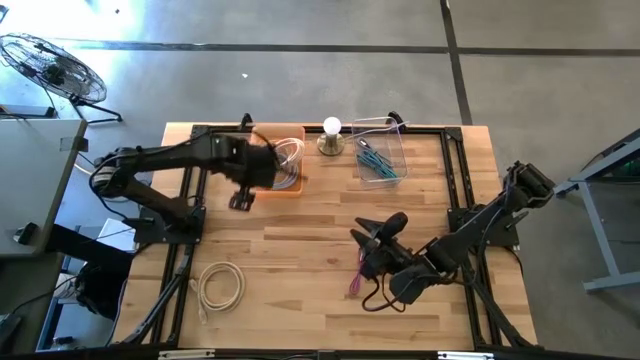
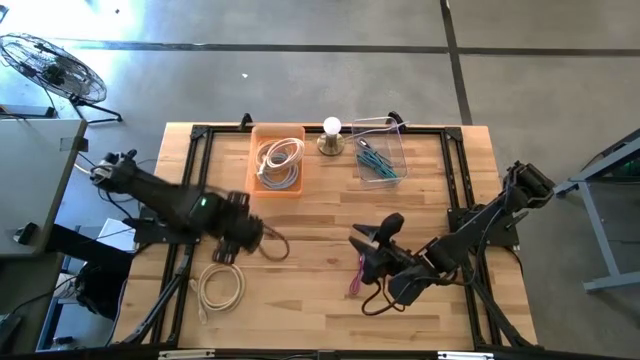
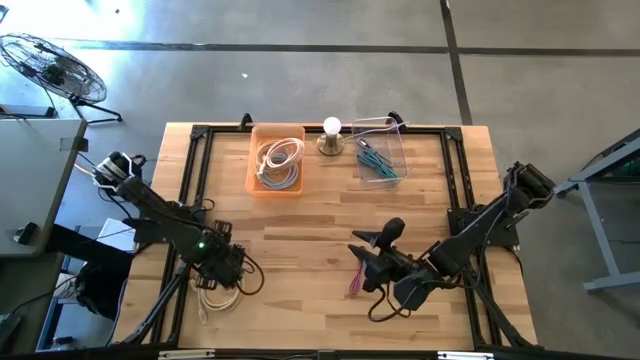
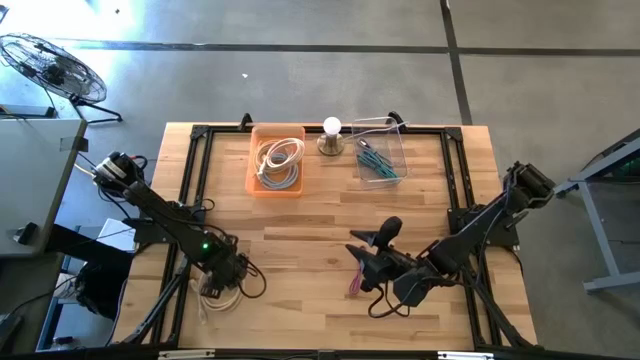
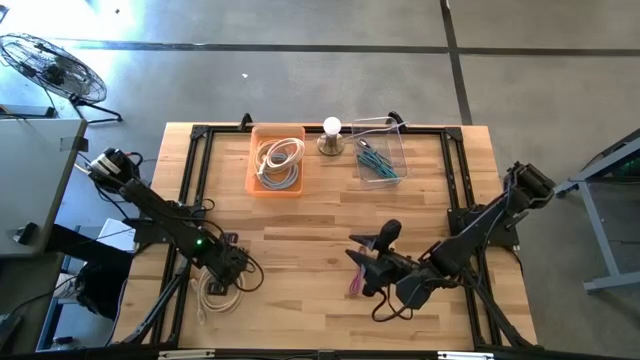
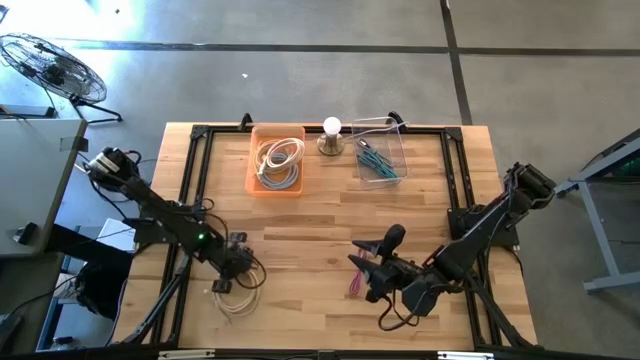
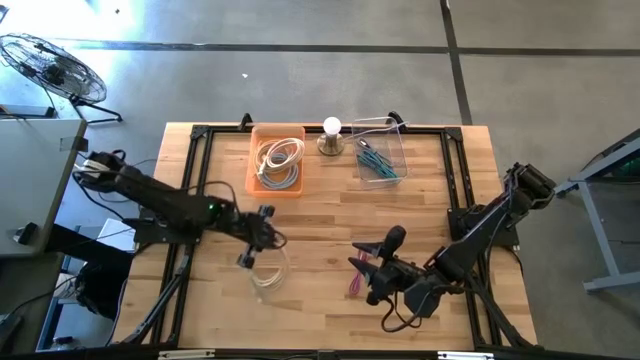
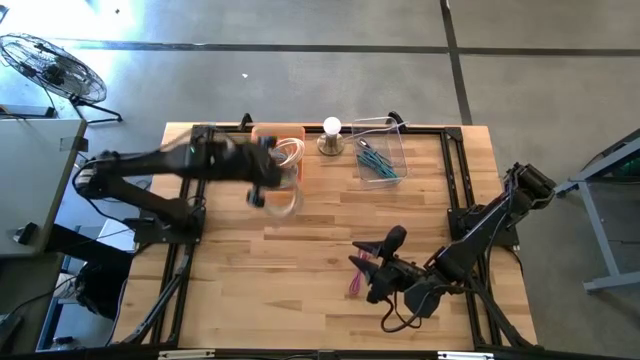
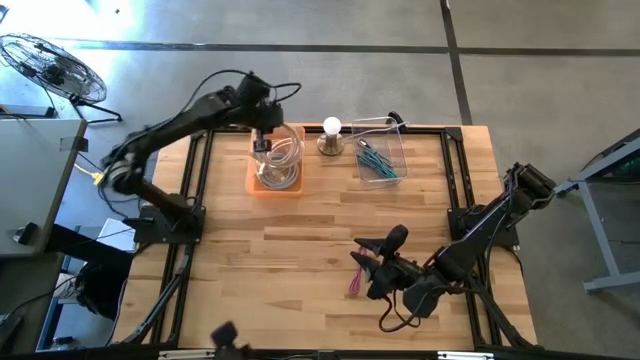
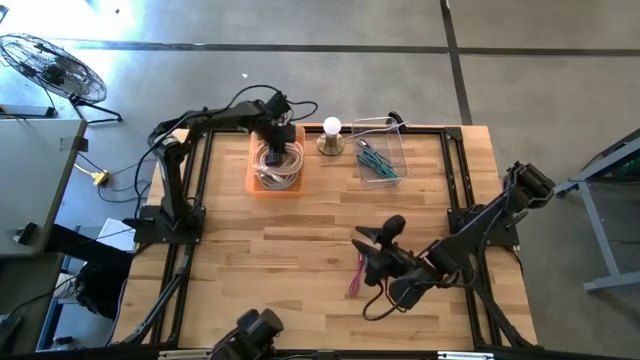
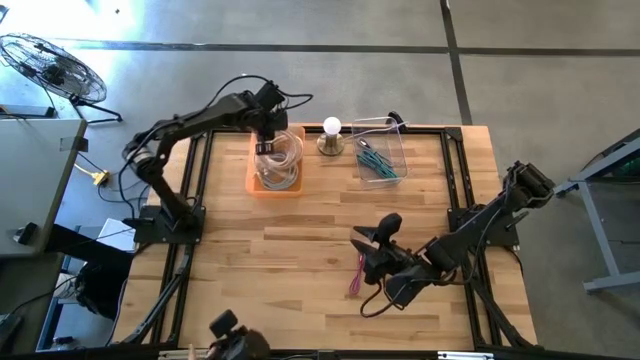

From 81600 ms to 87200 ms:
Task: Pick & Place USB Port
Put the light brown HDMI cable into the orange bin

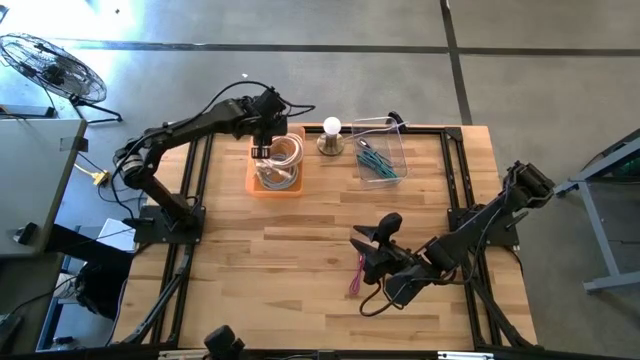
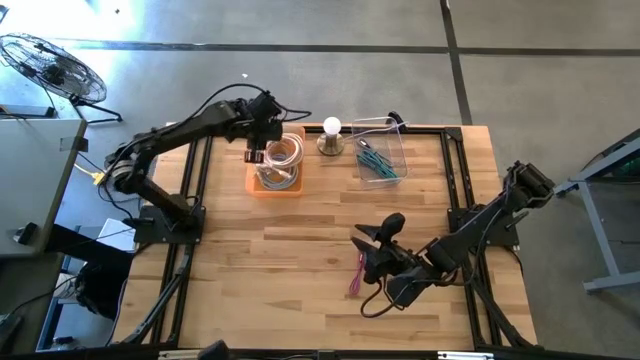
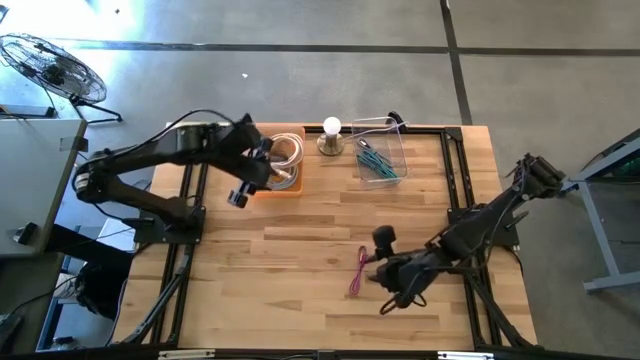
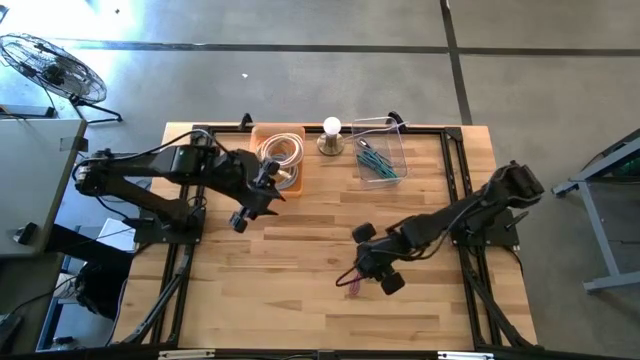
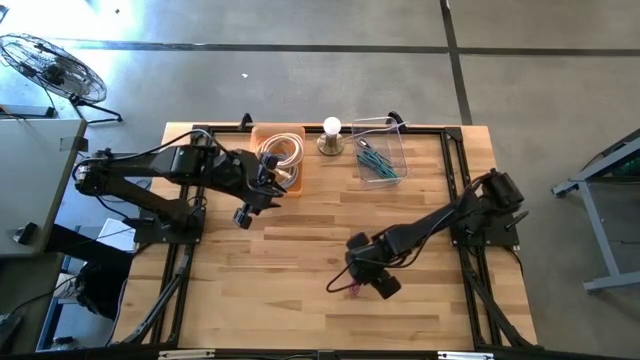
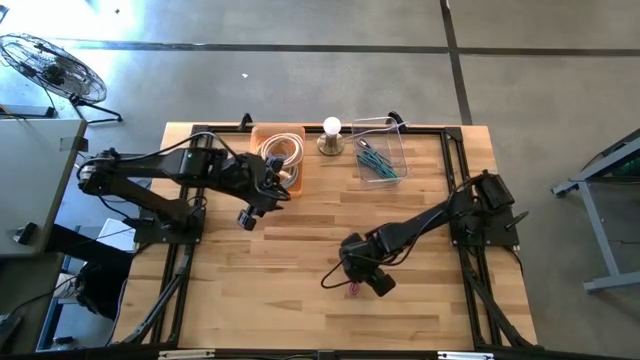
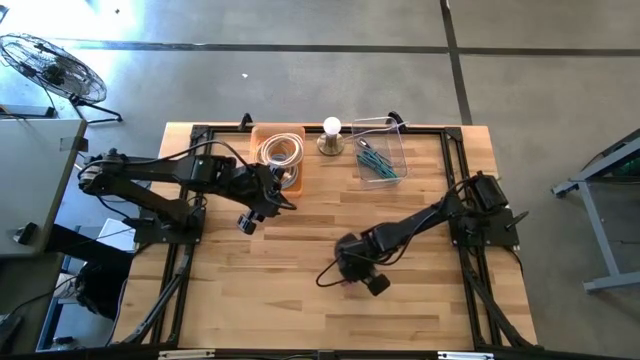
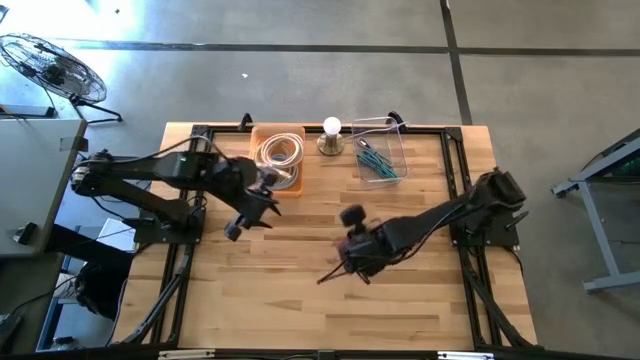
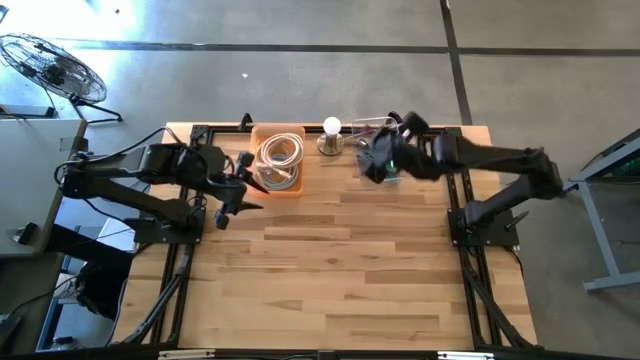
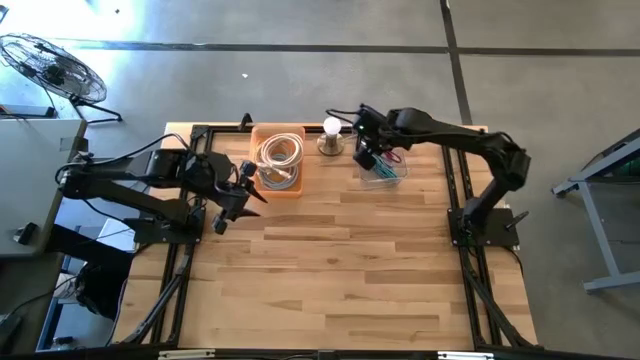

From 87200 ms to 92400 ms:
Put the pink charger cable into the transparent bin

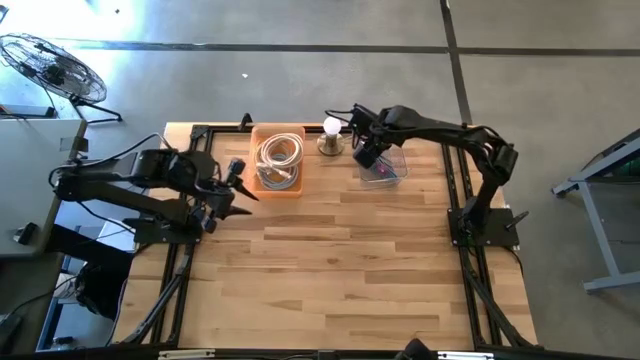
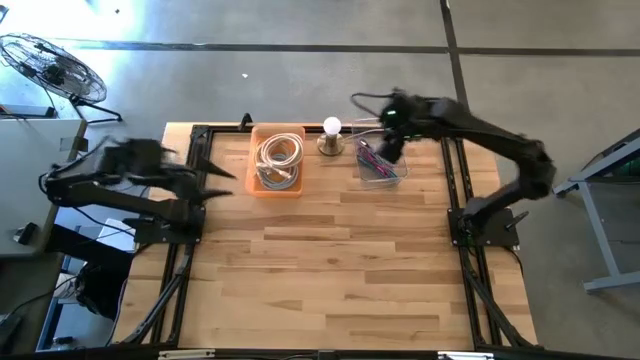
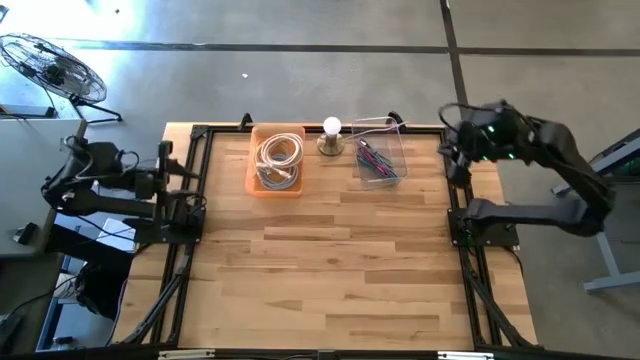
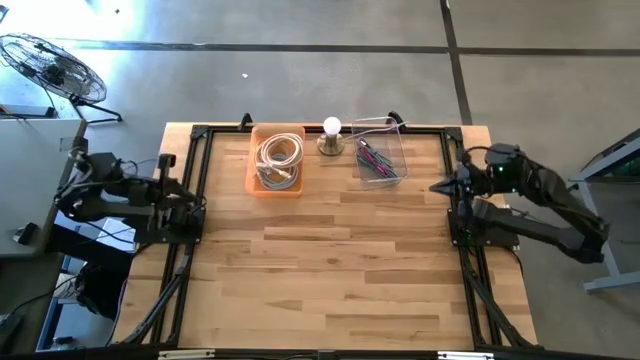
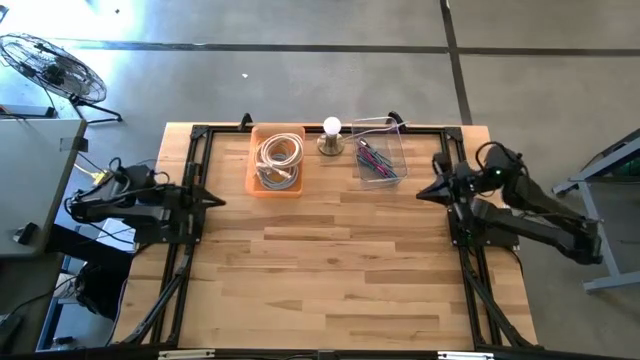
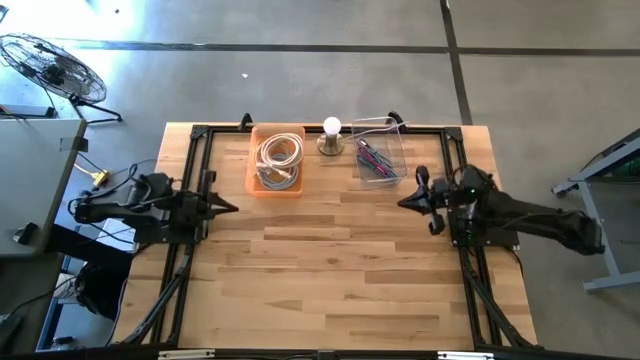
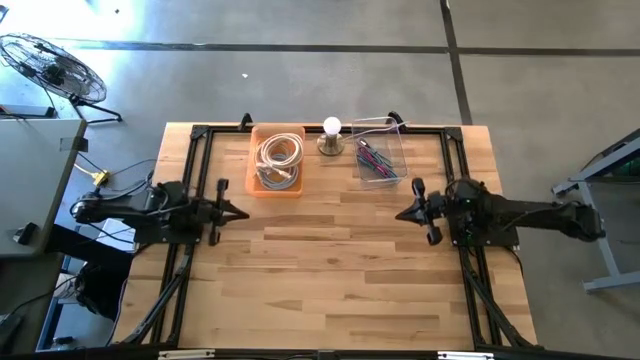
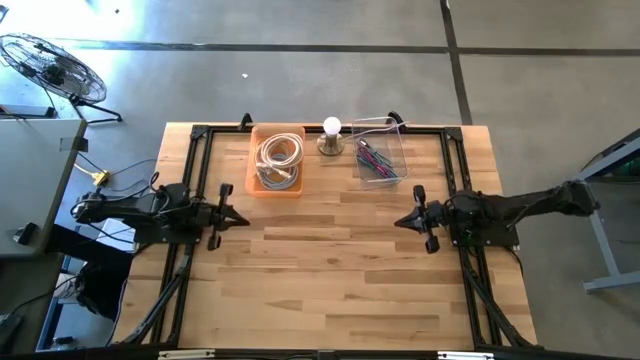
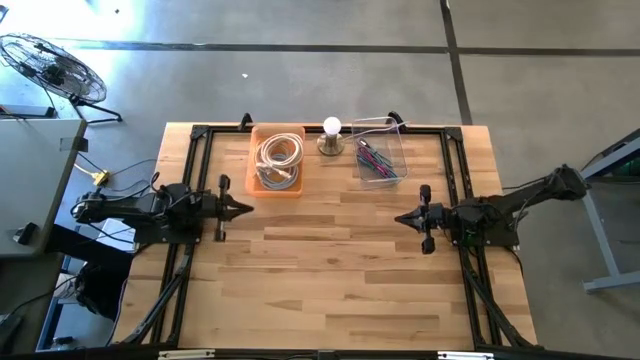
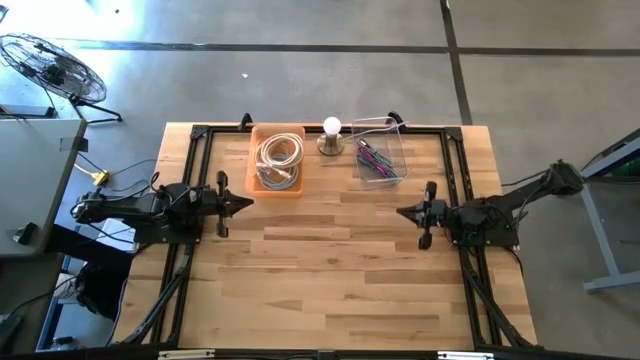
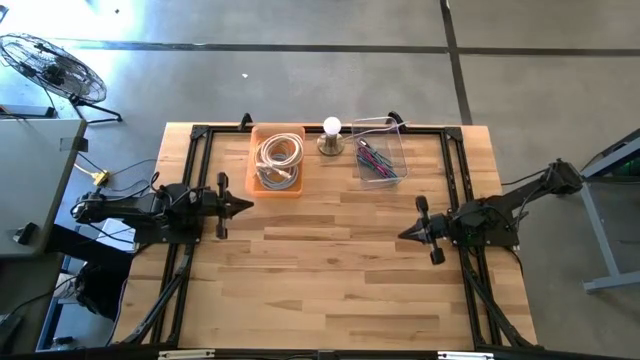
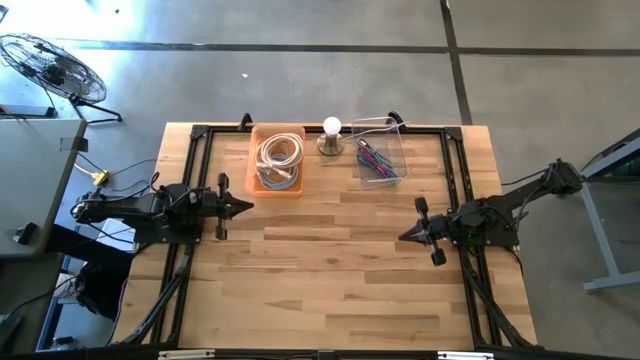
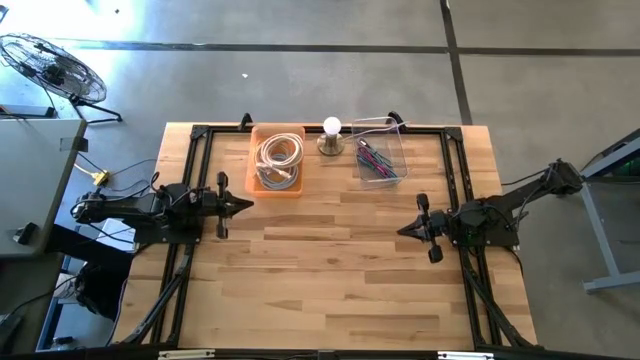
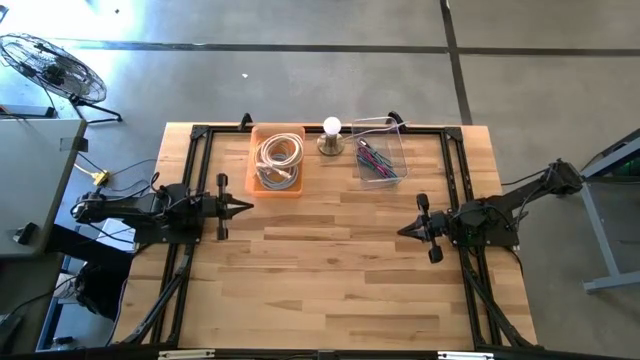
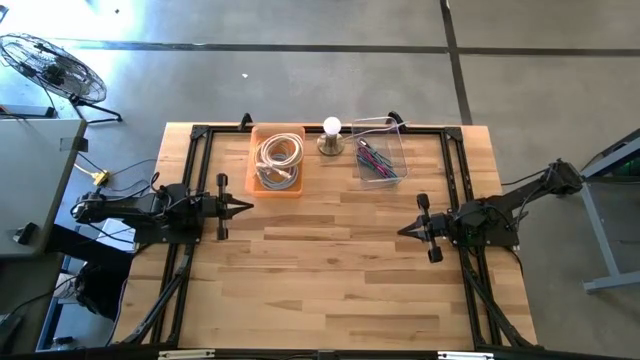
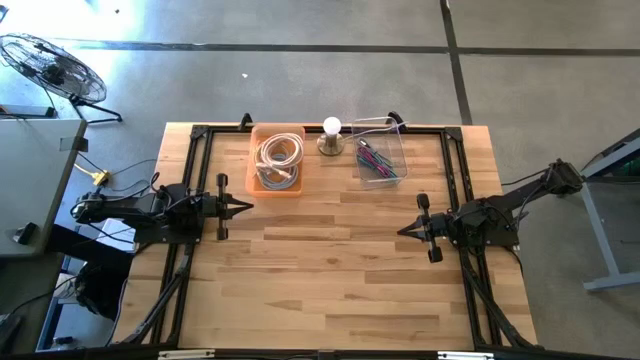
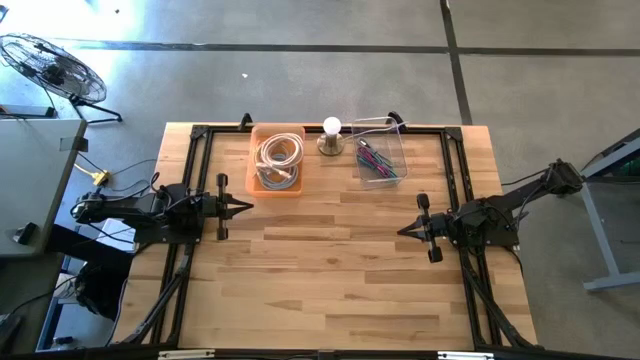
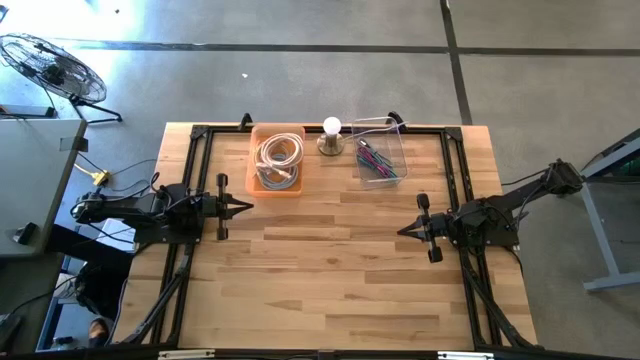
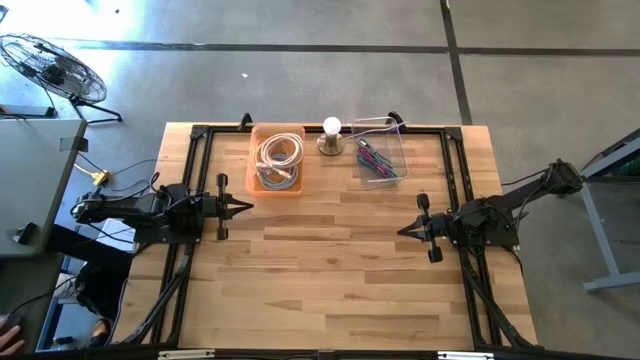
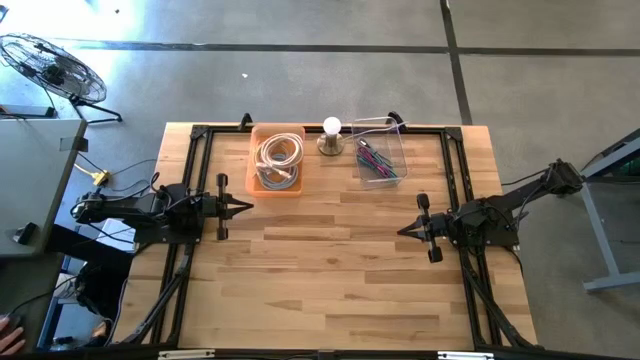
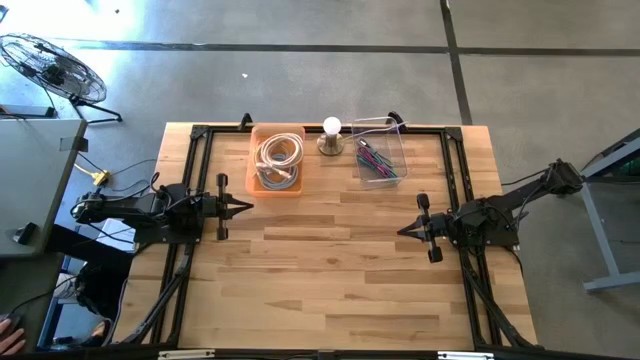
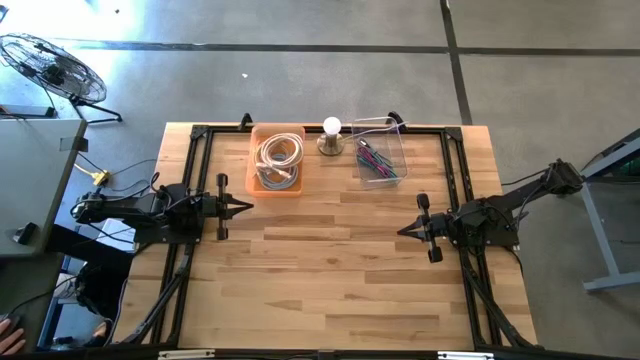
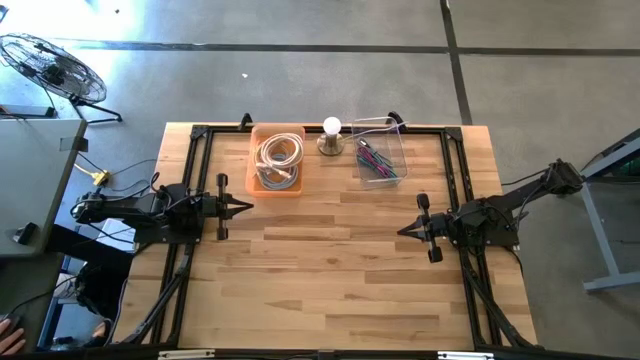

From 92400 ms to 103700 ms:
Return to Home Position
